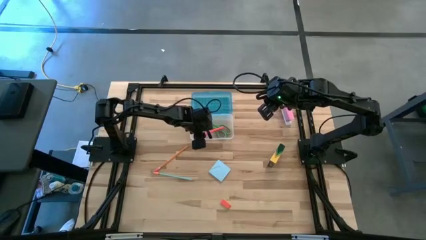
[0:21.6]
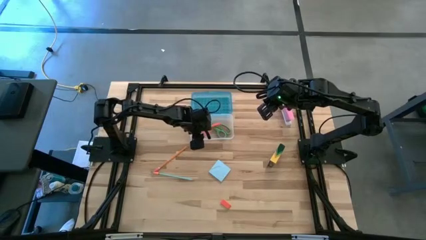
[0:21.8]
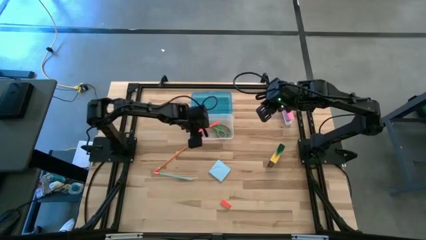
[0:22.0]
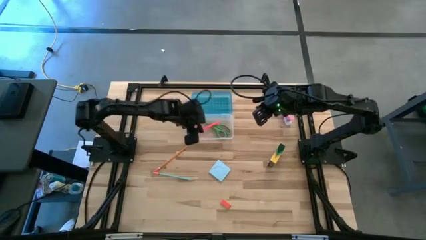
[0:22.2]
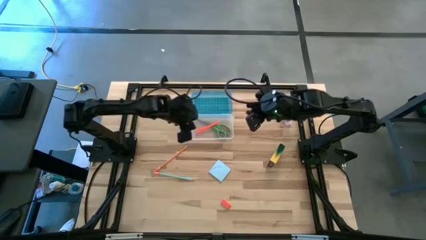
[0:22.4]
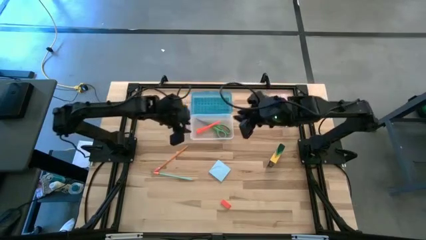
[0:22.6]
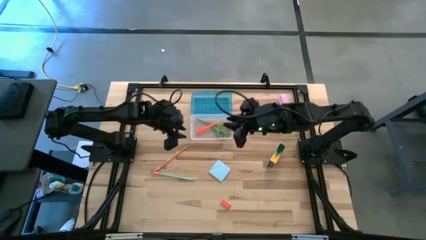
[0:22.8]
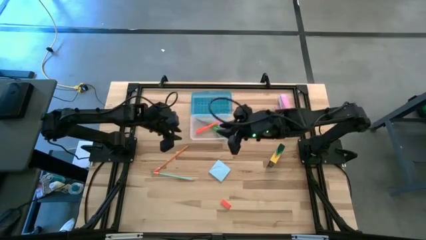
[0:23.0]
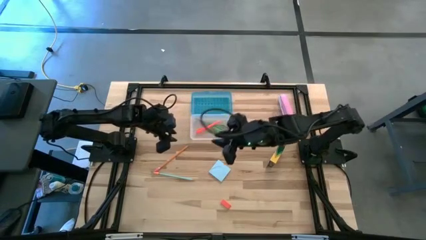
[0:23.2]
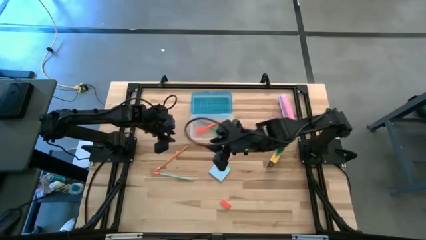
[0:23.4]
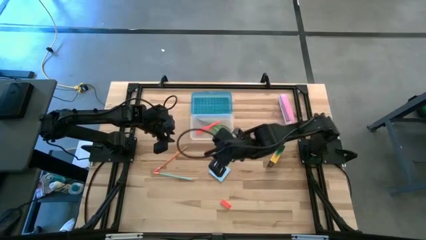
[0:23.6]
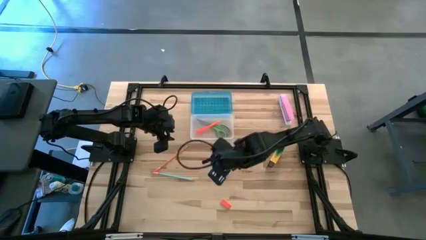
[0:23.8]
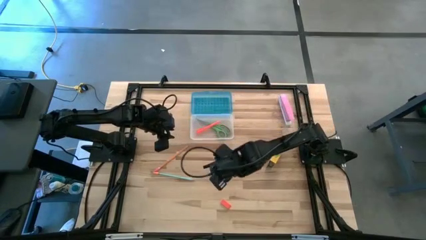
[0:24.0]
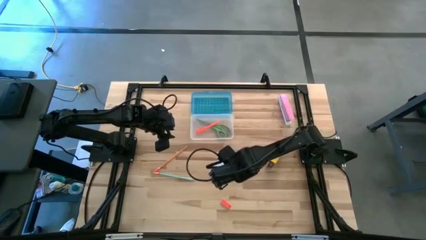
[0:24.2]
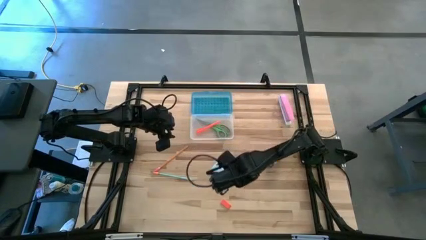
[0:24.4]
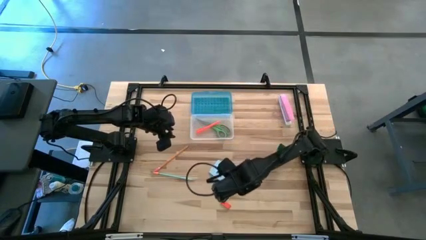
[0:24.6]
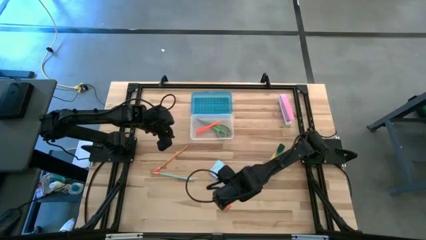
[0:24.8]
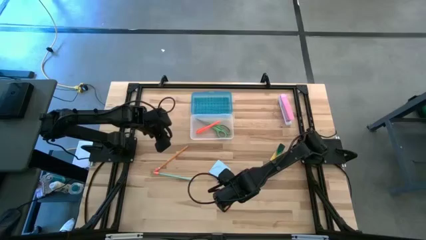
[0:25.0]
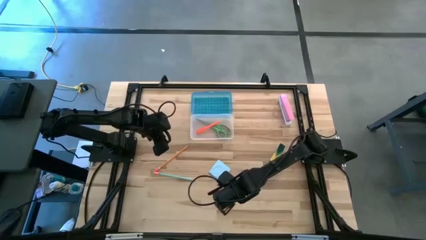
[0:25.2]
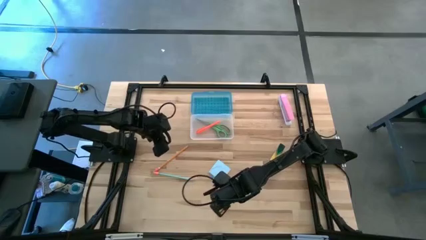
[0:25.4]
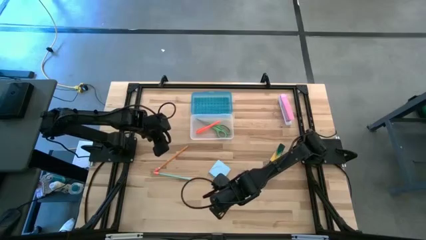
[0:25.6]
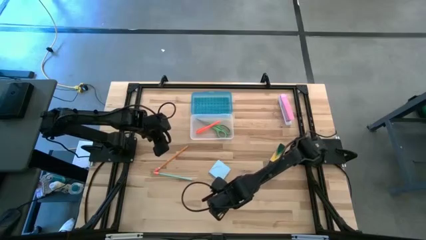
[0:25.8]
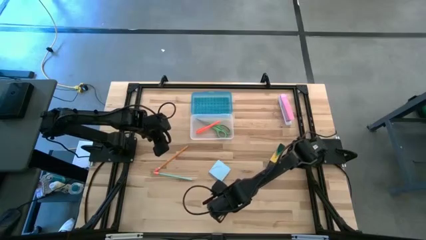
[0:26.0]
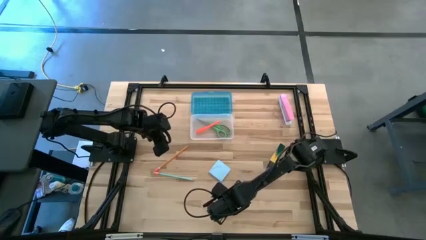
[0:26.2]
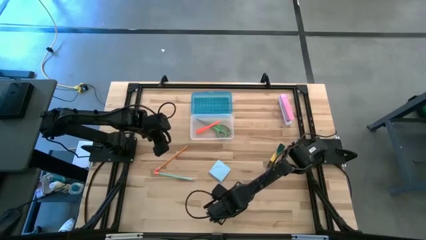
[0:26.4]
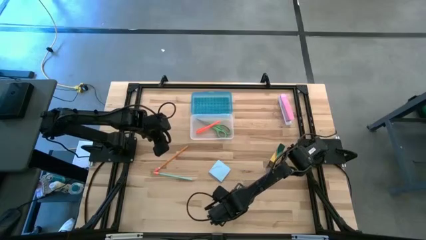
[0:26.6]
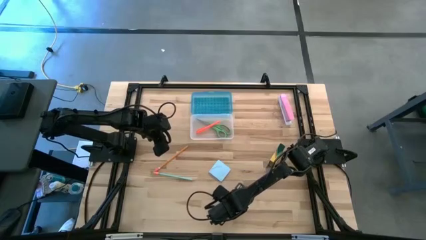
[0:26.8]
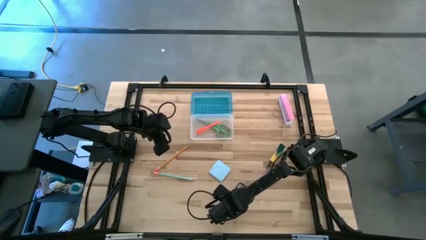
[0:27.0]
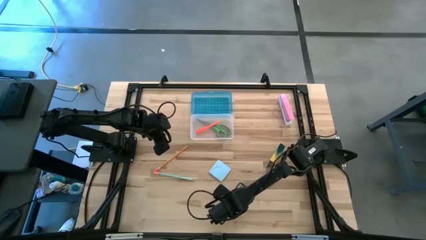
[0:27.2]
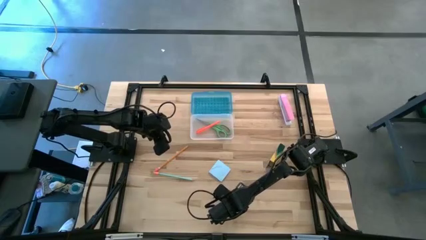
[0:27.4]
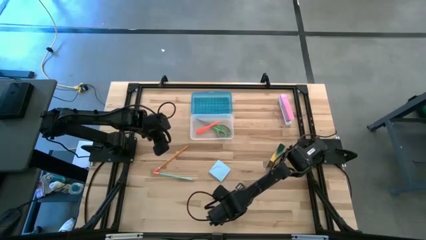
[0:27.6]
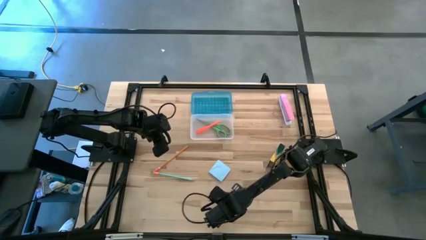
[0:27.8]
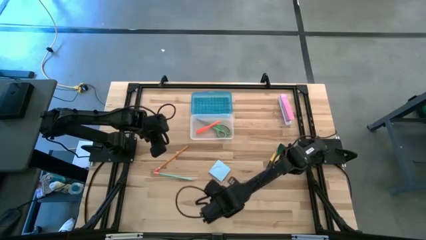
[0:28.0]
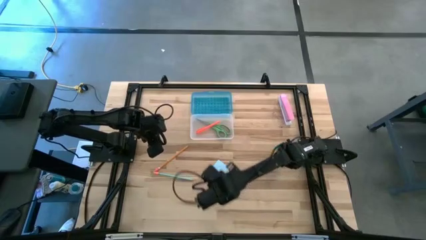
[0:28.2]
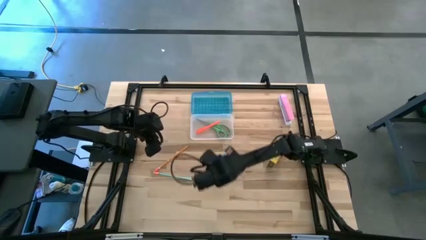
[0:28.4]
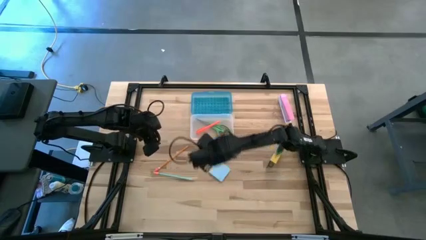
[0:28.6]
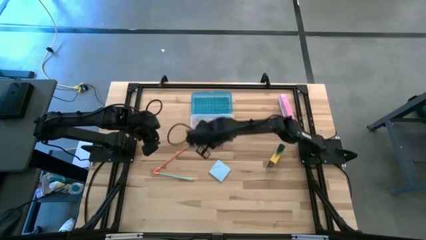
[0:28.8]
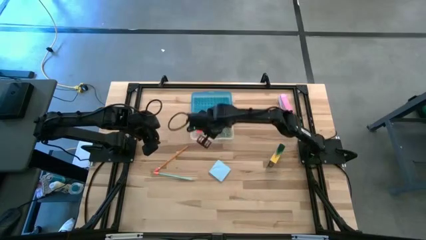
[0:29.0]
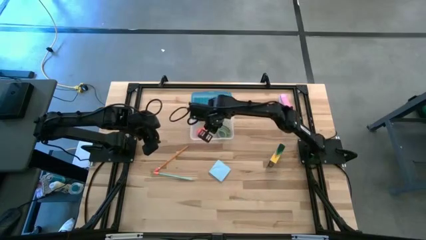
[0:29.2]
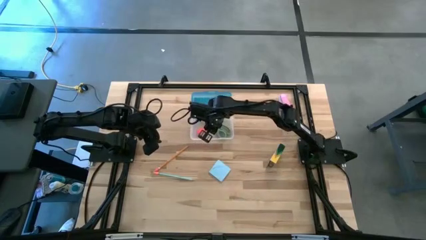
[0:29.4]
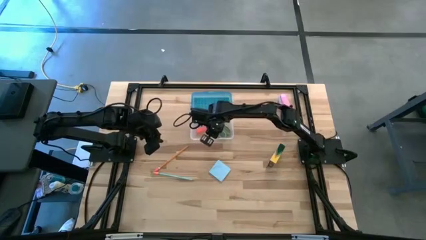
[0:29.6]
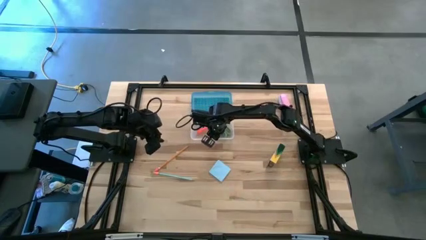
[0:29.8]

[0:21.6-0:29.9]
Task: Pack school essentials
Put the orange eraser into the blue supply box

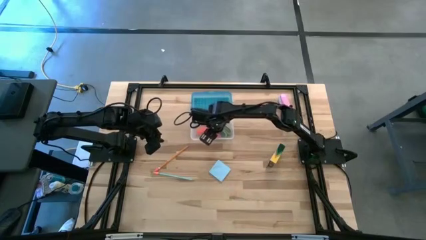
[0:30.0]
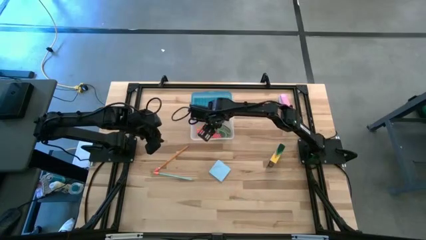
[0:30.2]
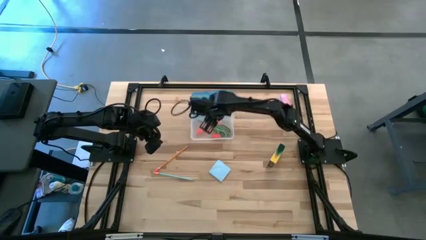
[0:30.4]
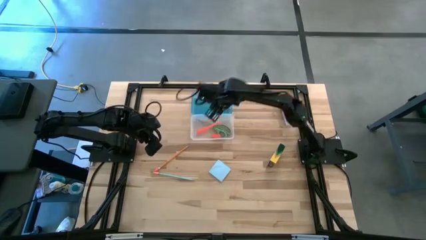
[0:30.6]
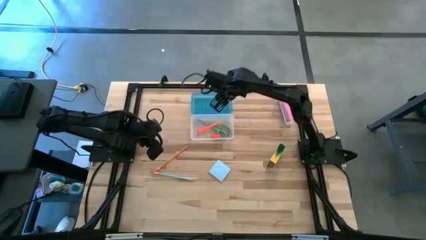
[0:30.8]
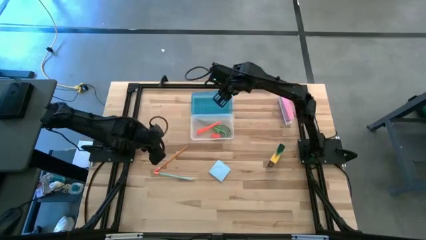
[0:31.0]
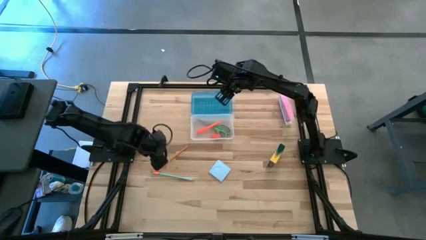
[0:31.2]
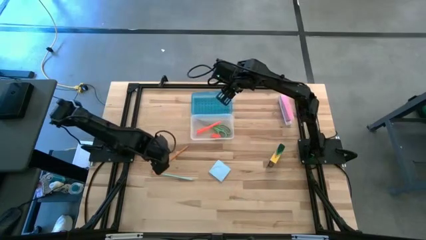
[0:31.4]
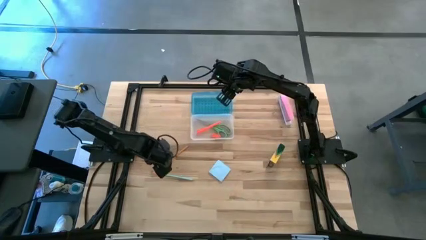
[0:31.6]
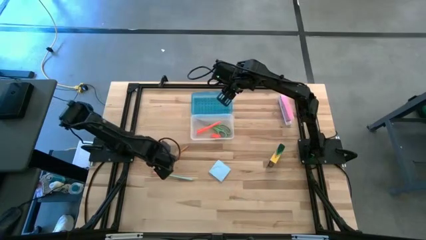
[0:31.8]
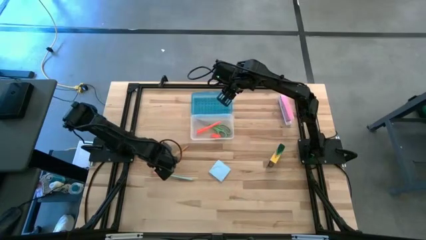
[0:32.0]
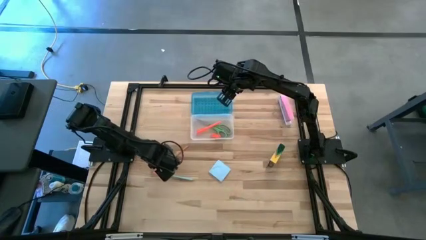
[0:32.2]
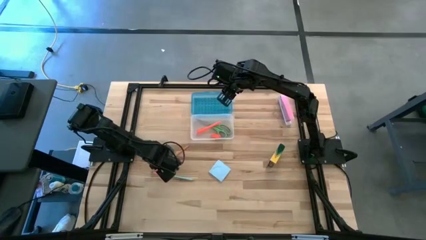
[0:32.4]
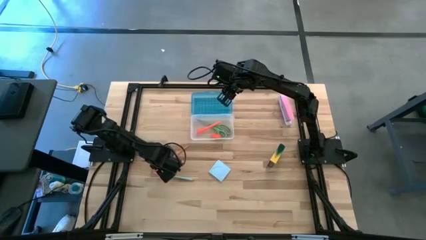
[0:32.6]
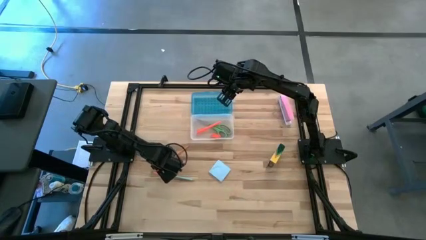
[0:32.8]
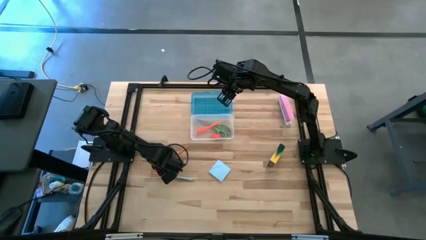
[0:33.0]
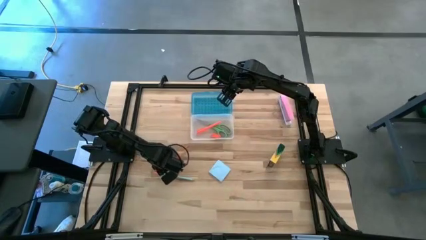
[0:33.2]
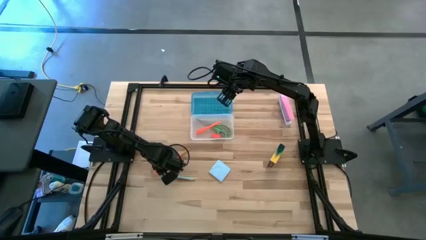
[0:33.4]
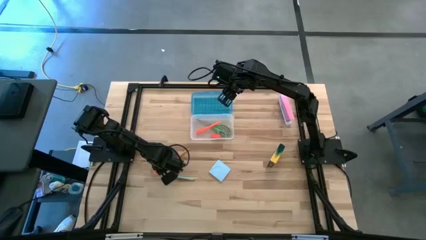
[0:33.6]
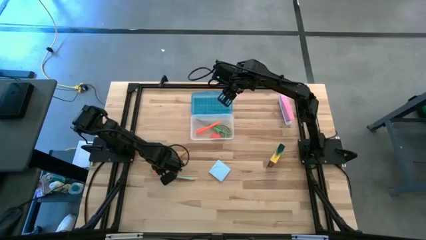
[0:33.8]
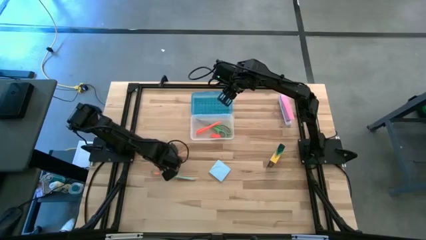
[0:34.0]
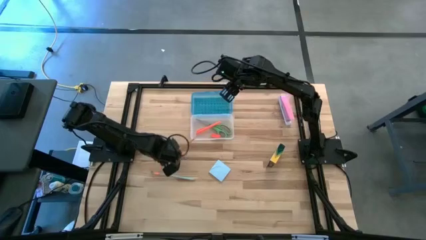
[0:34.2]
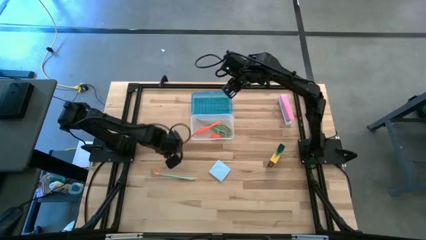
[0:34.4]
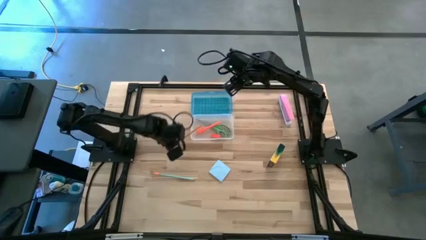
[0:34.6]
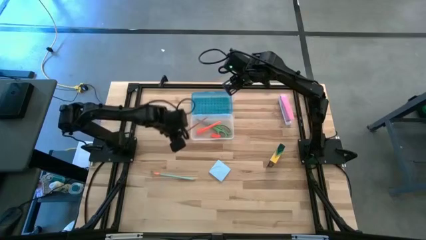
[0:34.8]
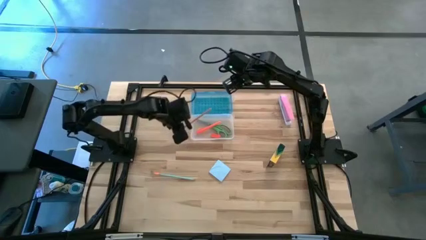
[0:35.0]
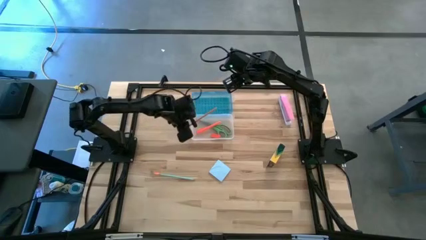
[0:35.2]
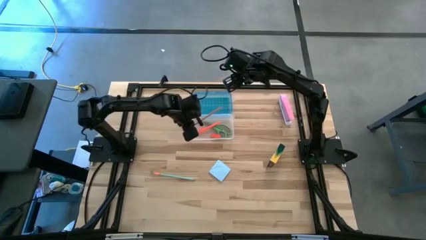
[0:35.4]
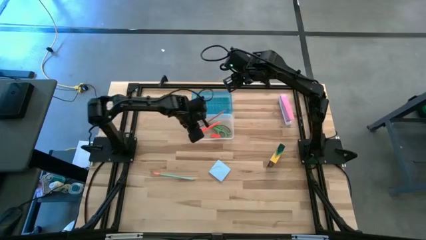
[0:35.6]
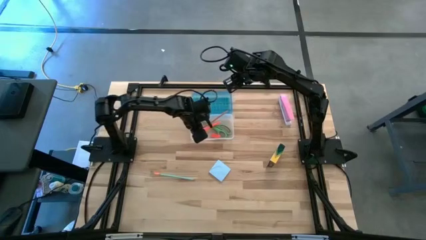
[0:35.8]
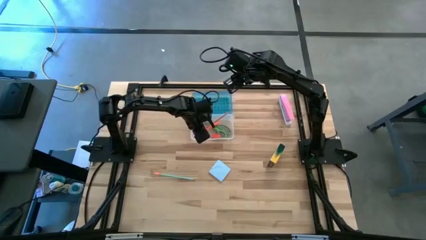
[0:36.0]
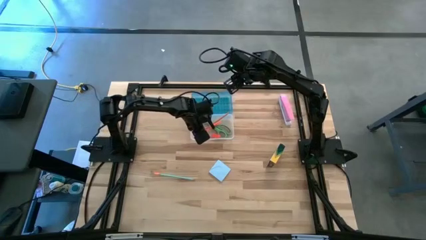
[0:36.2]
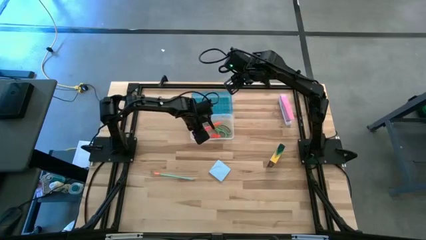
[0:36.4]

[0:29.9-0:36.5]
Put the yellow pencil into the blue supply box

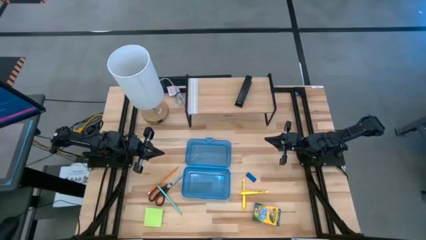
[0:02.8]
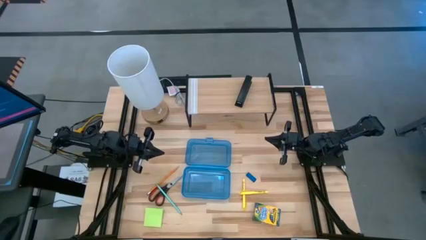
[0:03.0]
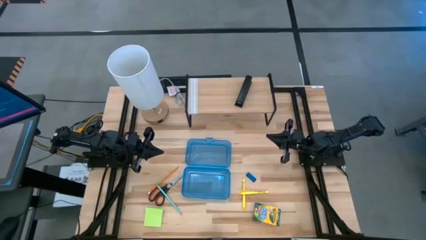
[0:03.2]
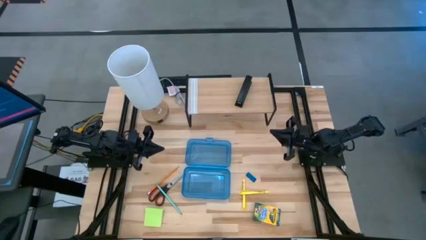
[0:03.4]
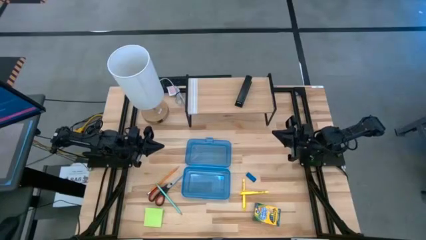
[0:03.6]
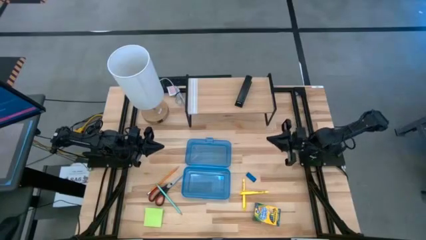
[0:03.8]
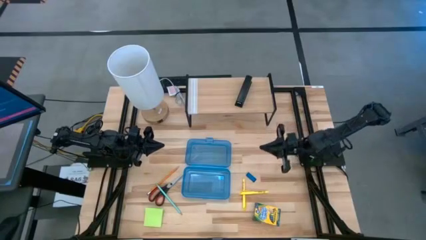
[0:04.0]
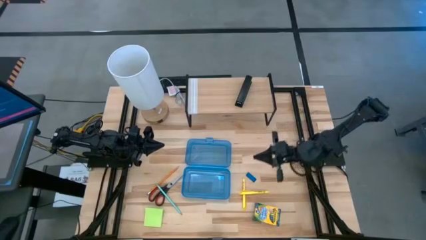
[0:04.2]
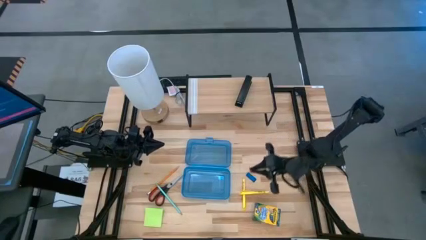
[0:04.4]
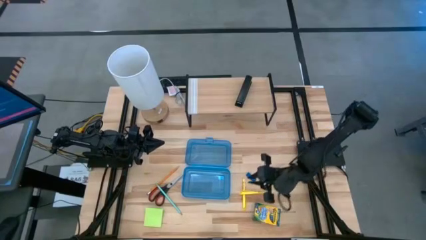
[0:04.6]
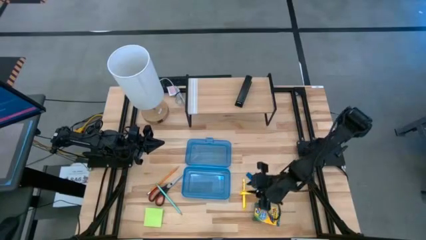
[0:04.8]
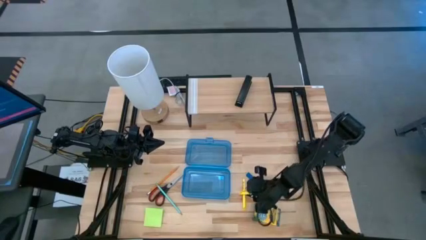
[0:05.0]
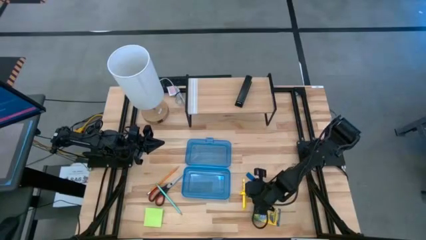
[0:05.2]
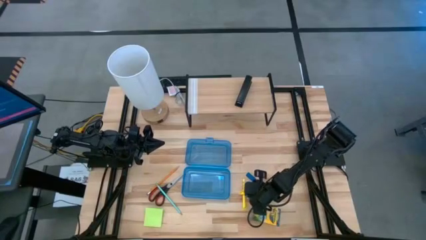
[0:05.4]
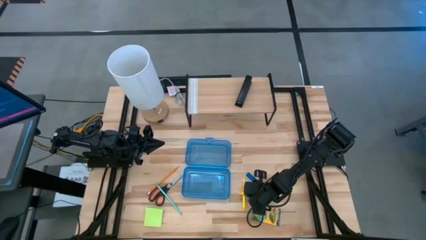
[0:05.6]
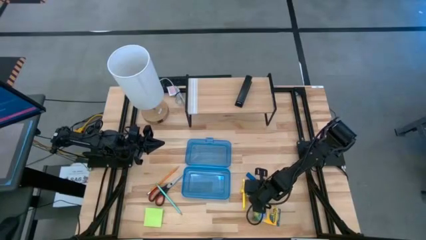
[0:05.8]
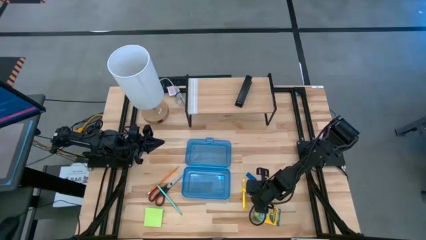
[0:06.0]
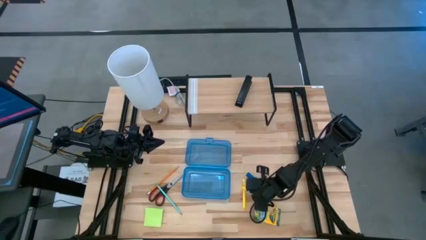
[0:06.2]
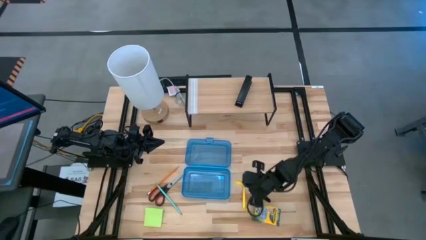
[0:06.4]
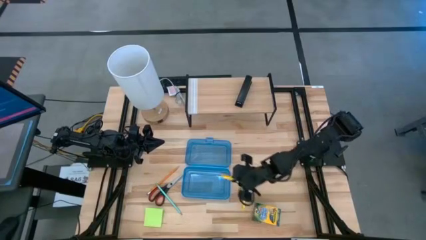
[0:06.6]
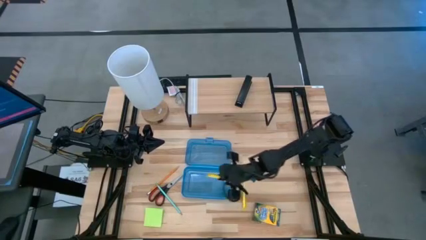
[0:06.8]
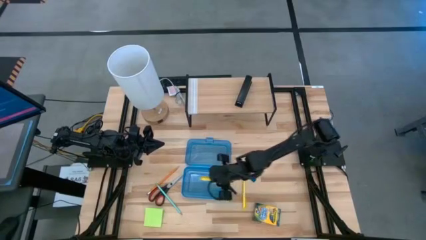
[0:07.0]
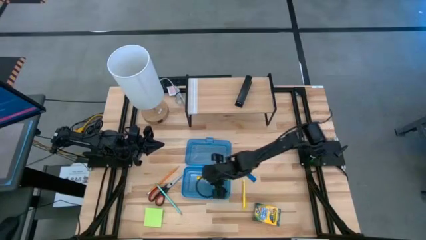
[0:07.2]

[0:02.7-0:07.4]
Task: Pack school essentials
Put the yellow pen into the supply box
